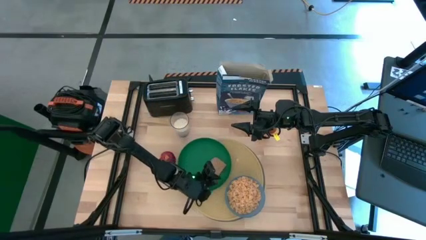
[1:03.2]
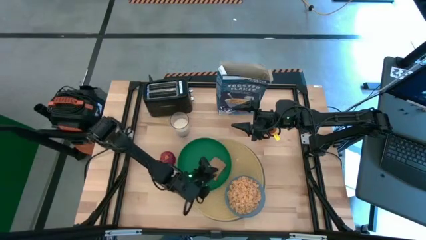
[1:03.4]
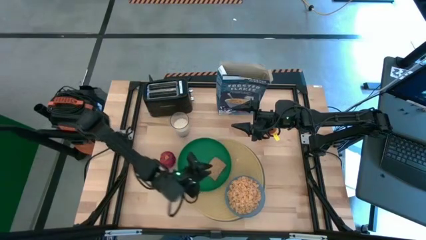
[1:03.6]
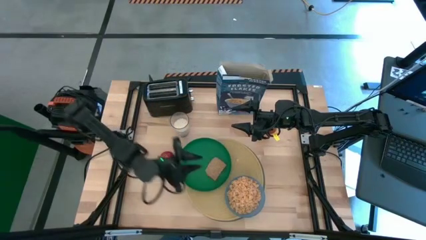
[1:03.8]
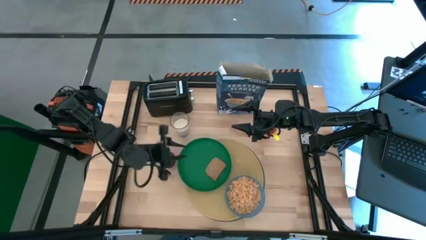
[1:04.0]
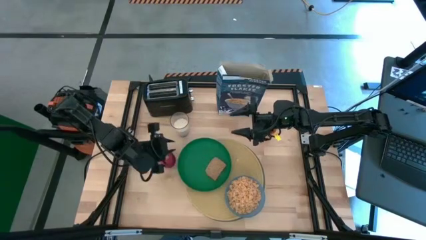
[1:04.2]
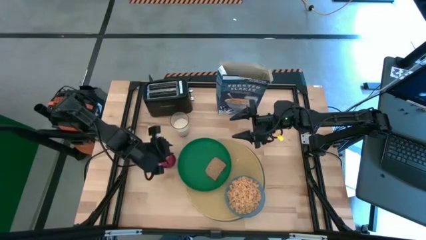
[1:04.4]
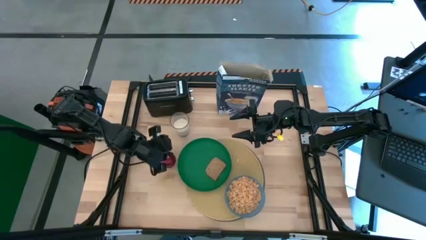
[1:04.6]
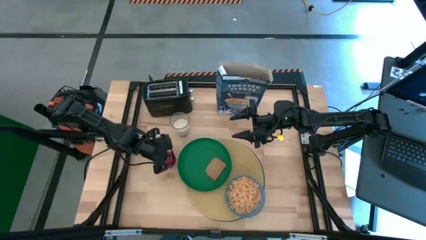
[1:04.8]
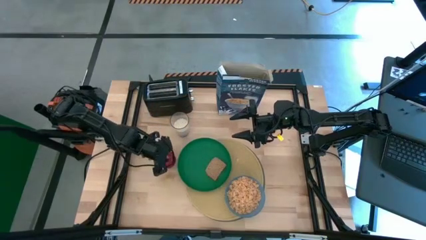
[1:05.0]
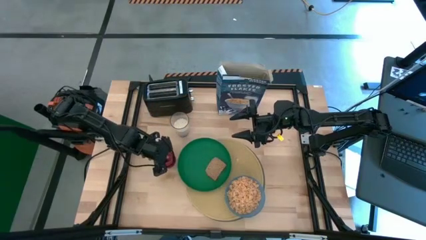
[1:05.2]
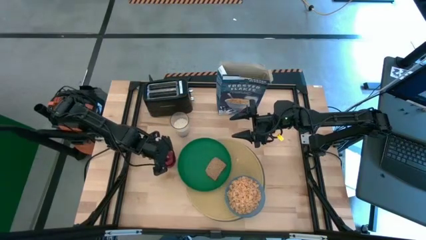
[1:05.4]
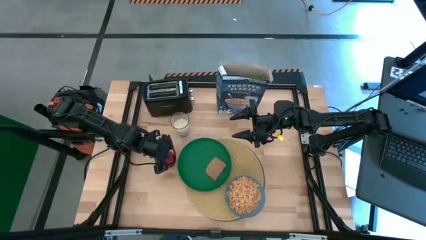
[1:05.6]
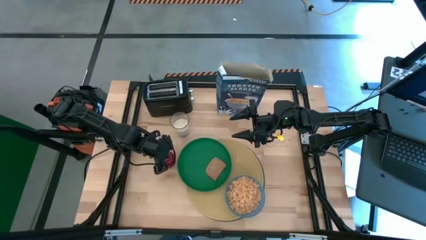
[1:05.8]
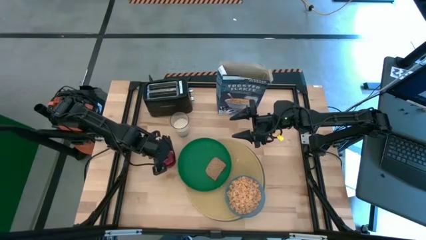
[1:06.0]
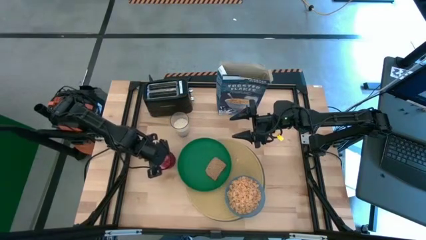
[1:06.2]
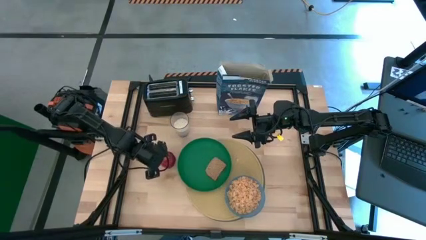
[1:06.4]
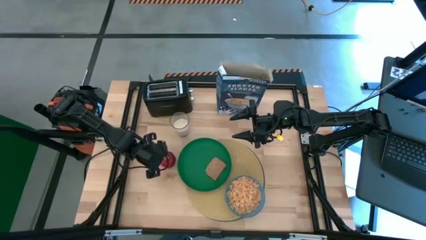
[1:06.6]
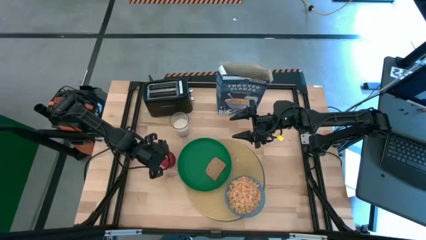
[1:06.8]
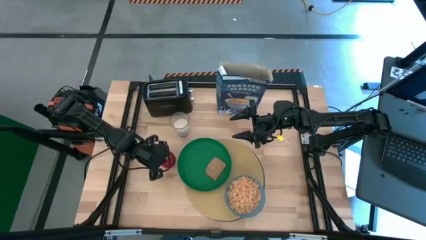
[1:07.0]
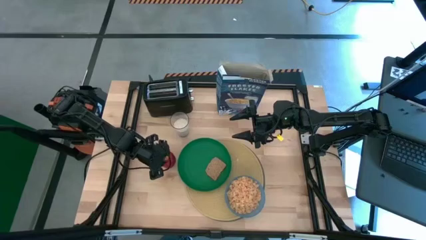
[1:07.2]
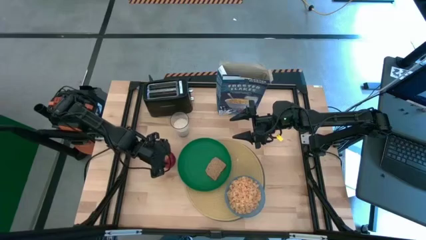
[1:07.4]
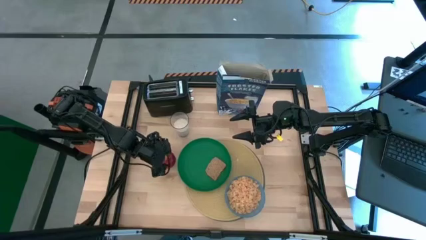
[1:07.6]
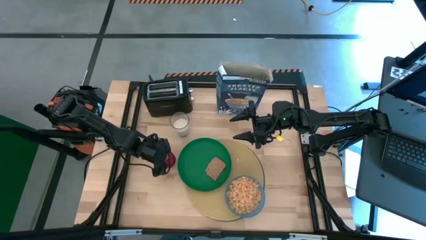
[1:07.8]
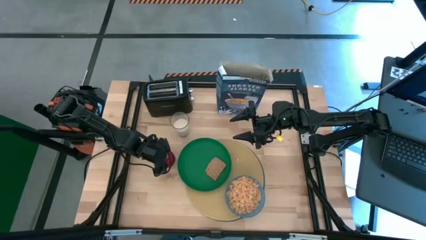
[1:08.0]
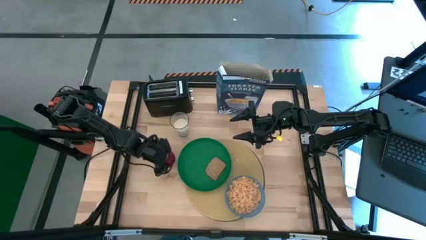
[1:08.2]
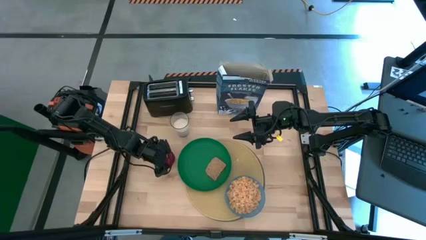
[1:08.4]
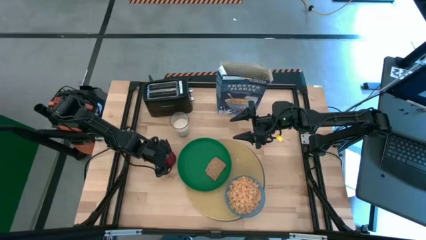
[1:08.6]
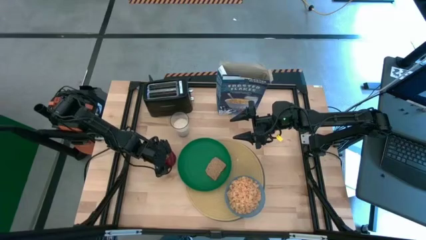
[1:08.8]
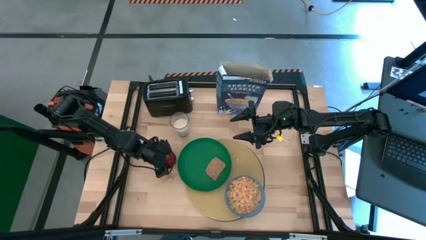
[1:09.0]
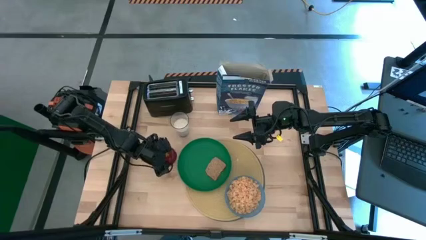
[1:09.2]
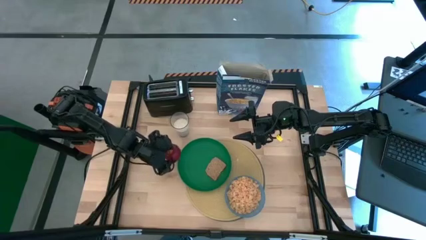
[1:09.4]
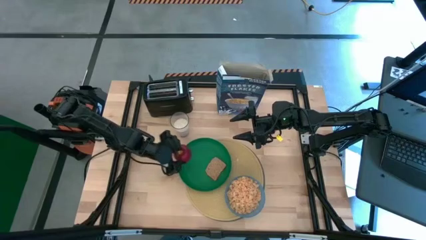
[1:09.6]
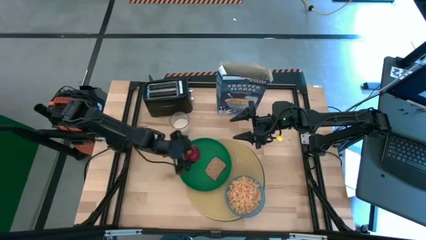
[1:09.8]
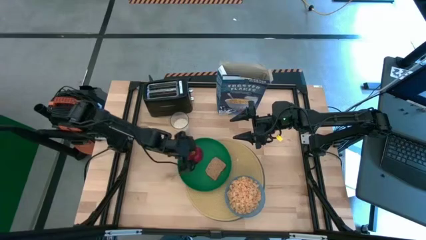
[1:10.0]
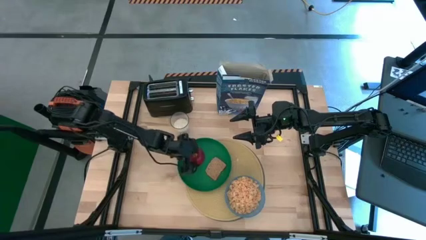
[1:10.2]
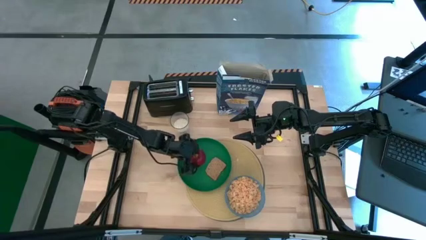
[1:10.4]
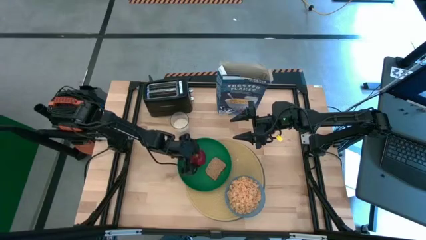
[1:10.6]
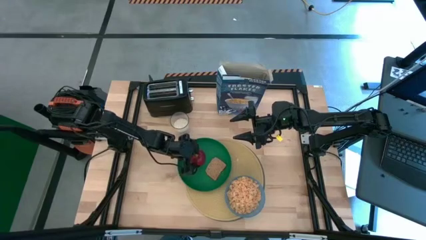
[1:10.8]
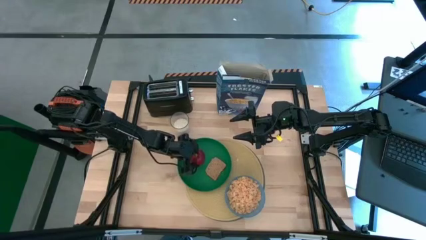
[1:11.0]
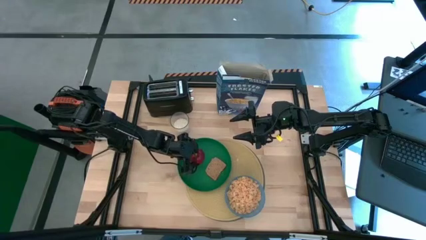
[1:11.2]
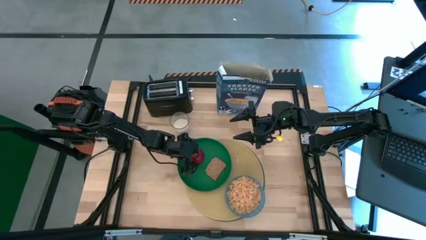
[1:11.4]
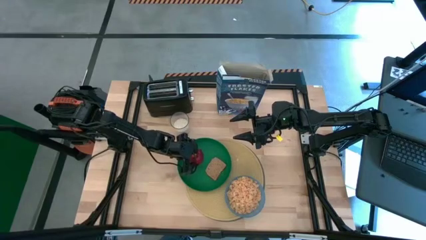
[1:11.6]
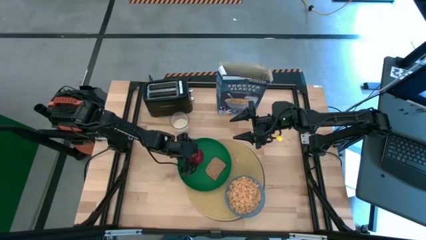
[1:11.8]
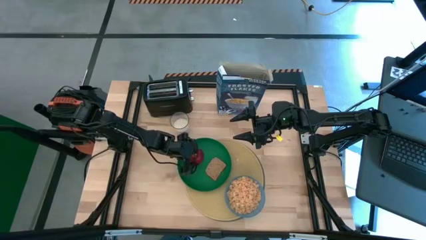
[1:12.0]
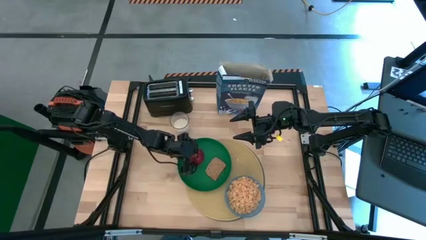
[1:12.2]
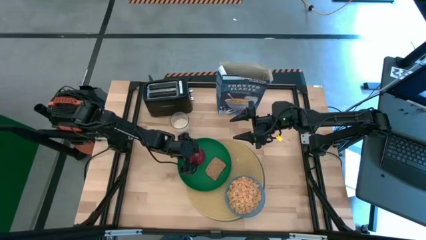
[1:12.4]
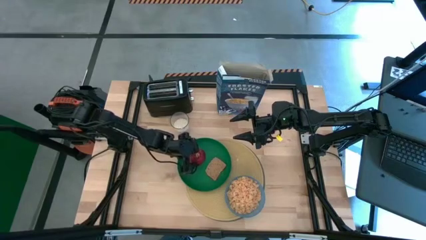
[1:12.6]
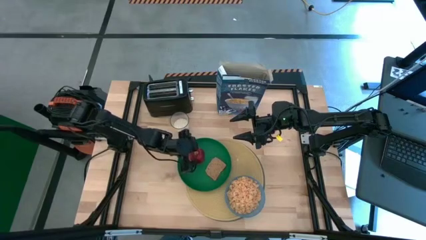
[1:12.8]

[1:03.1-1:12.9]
Task: Arrange a breakfast setting
Put the red apple into the green plate
